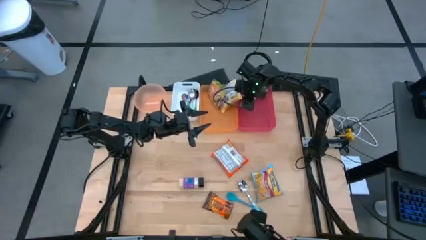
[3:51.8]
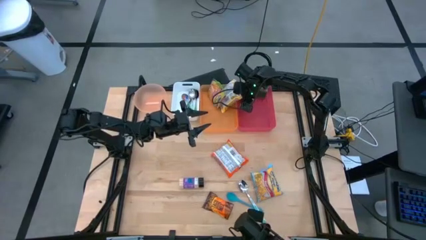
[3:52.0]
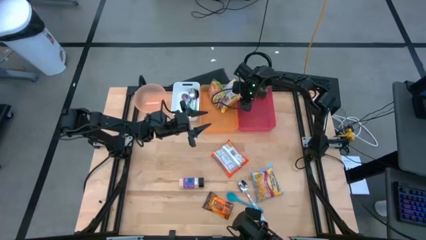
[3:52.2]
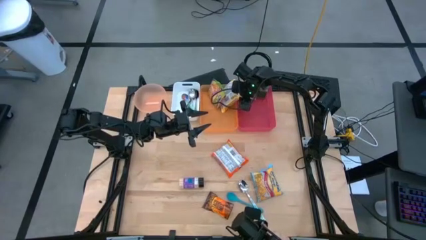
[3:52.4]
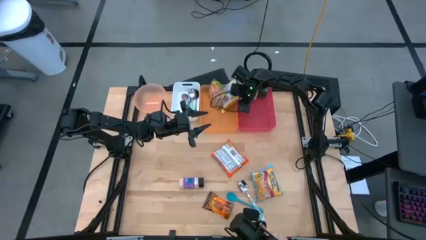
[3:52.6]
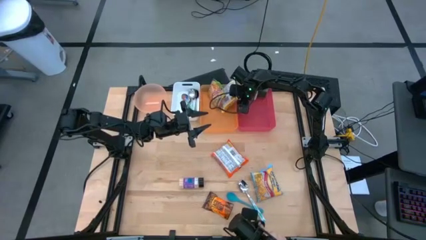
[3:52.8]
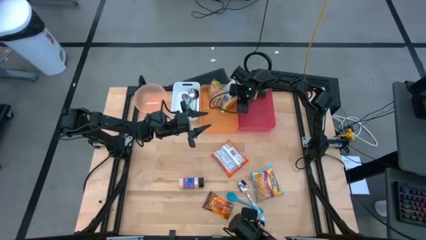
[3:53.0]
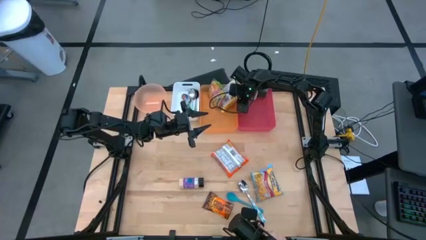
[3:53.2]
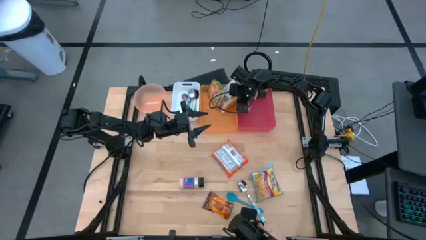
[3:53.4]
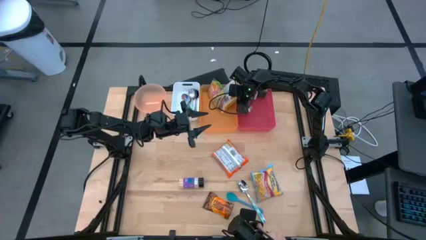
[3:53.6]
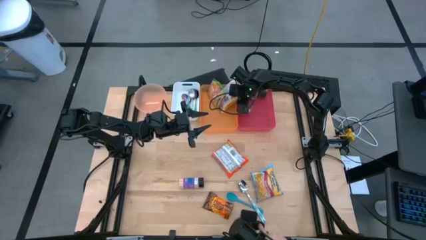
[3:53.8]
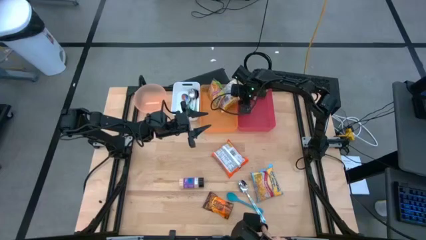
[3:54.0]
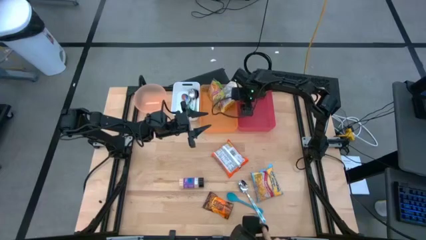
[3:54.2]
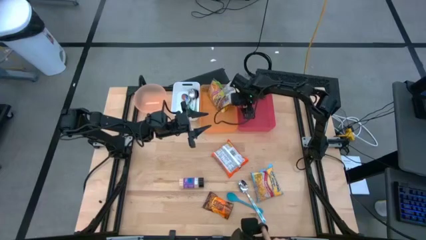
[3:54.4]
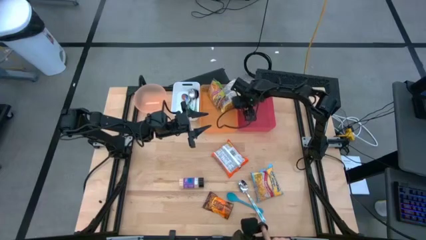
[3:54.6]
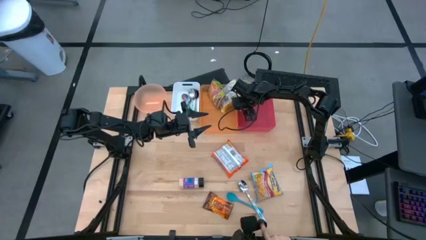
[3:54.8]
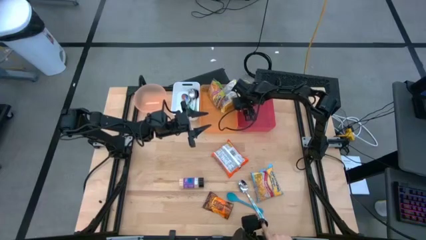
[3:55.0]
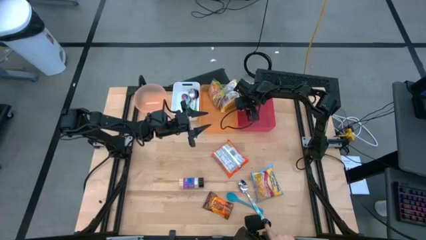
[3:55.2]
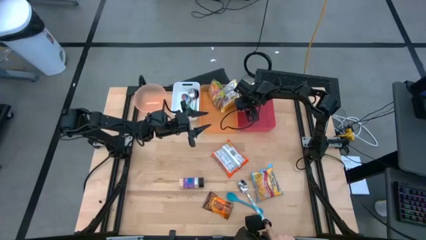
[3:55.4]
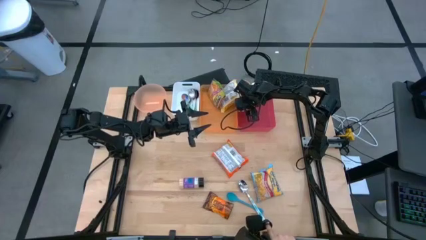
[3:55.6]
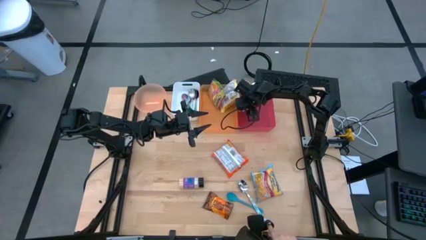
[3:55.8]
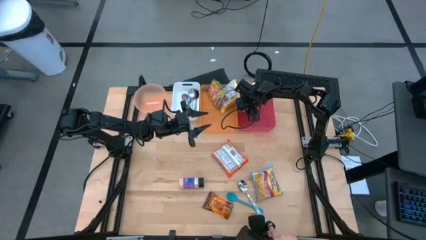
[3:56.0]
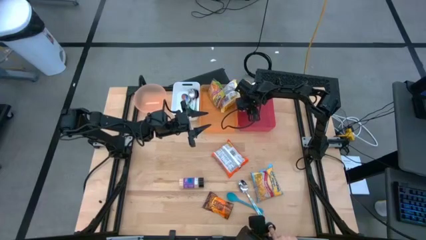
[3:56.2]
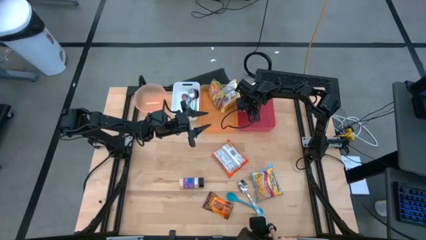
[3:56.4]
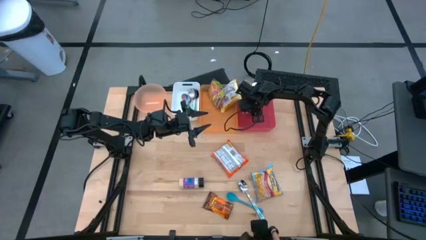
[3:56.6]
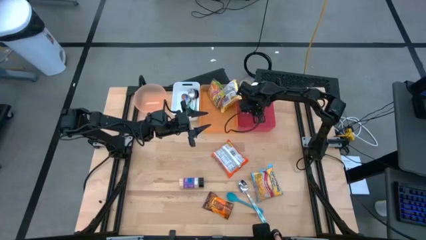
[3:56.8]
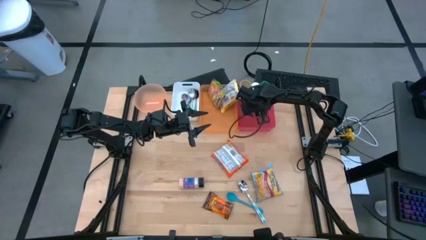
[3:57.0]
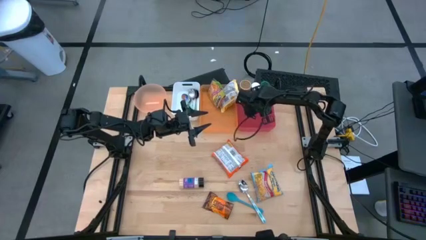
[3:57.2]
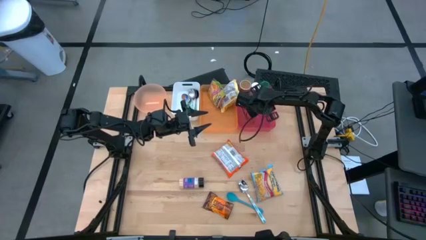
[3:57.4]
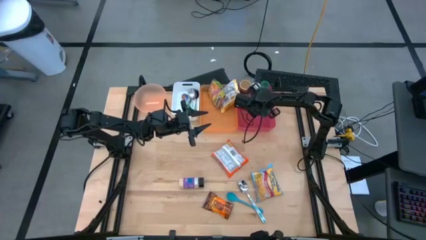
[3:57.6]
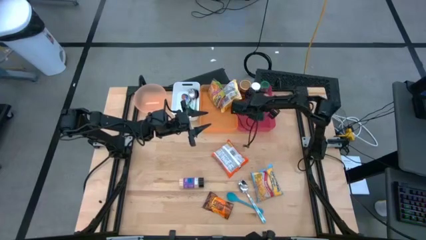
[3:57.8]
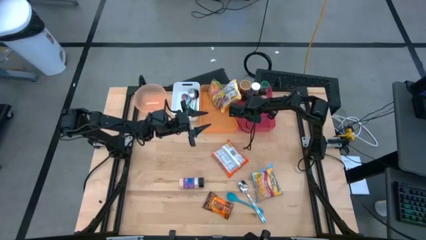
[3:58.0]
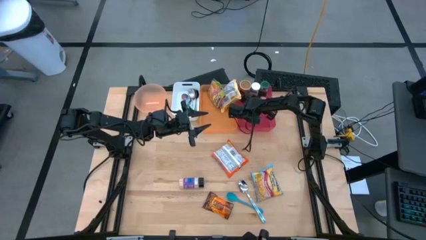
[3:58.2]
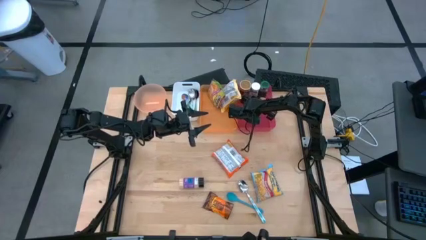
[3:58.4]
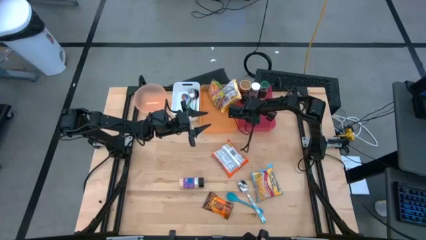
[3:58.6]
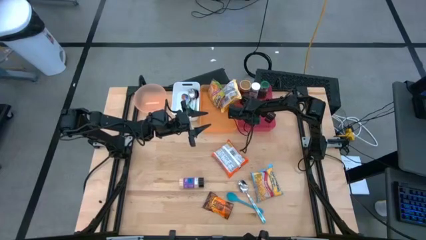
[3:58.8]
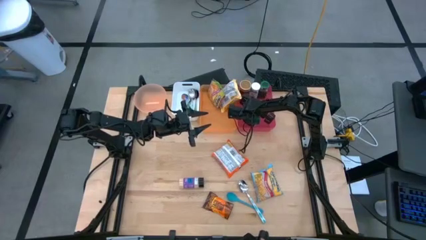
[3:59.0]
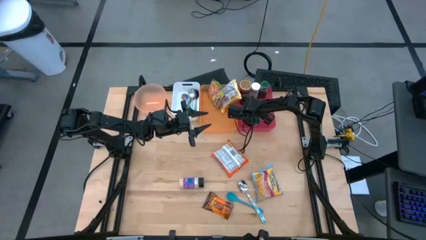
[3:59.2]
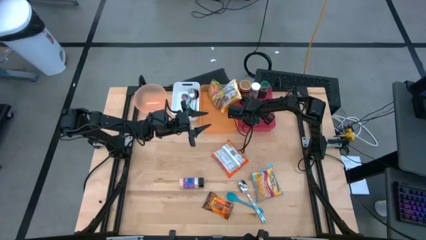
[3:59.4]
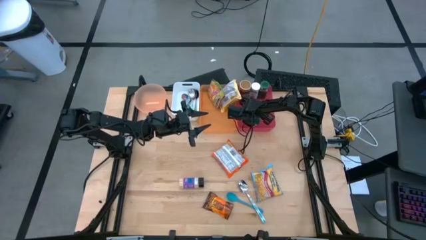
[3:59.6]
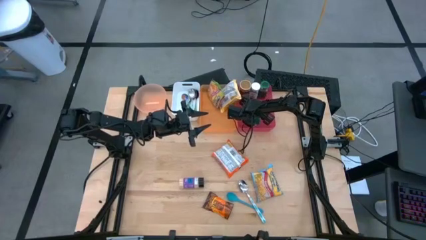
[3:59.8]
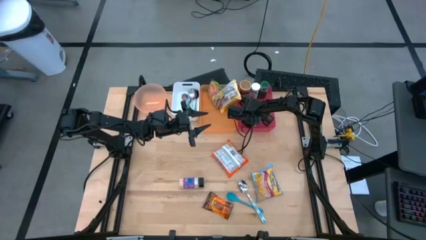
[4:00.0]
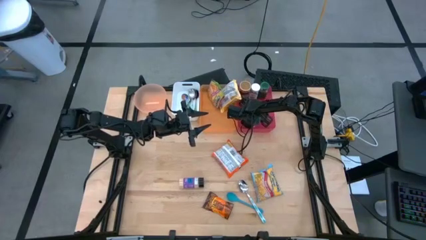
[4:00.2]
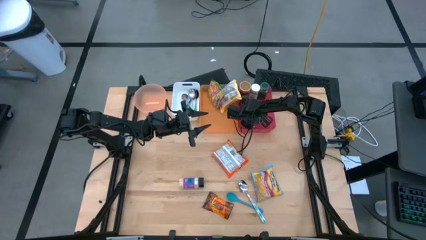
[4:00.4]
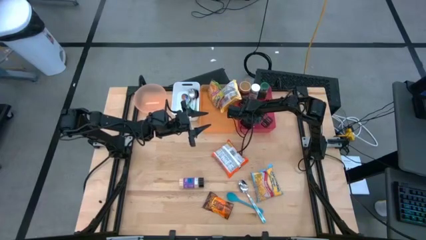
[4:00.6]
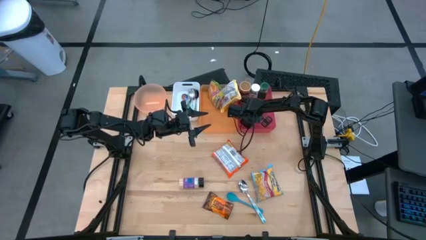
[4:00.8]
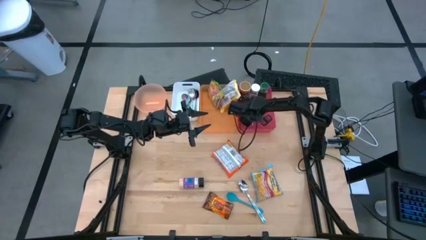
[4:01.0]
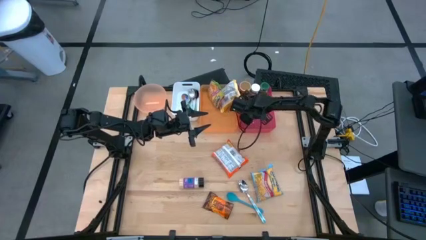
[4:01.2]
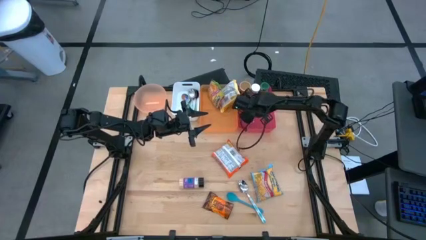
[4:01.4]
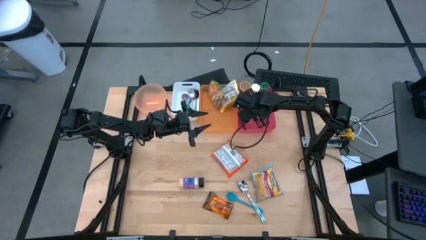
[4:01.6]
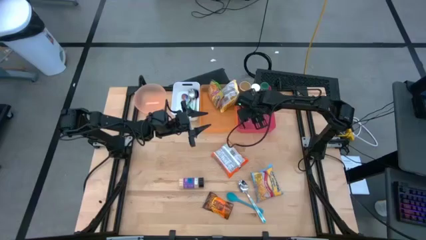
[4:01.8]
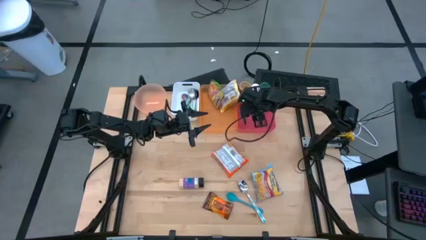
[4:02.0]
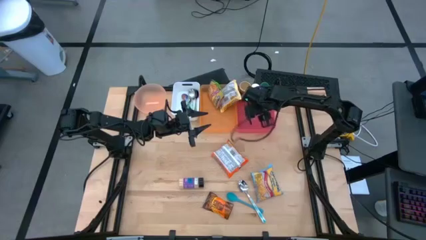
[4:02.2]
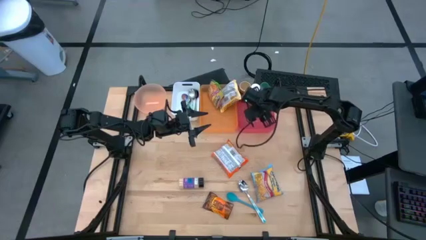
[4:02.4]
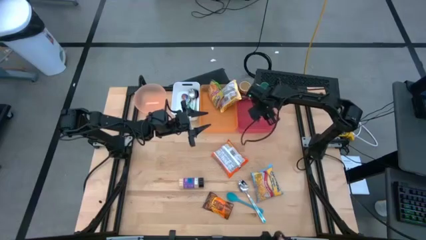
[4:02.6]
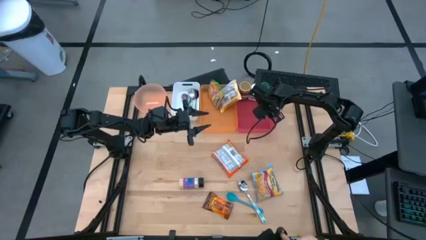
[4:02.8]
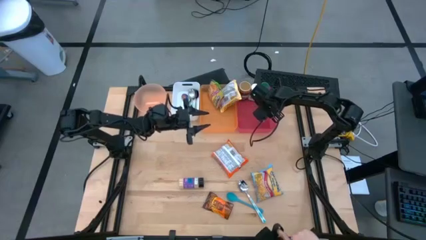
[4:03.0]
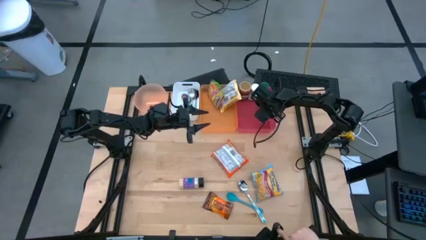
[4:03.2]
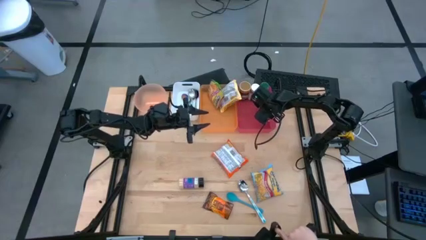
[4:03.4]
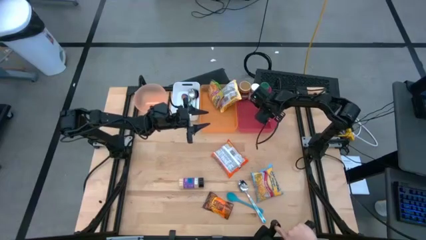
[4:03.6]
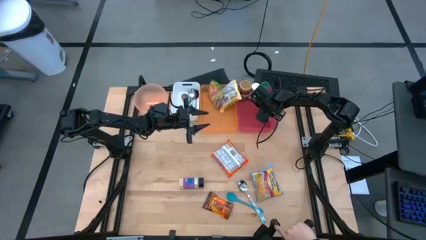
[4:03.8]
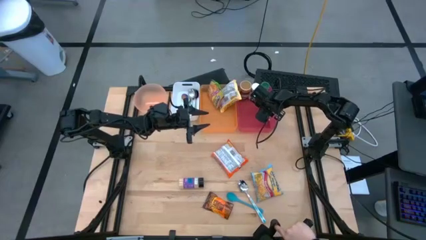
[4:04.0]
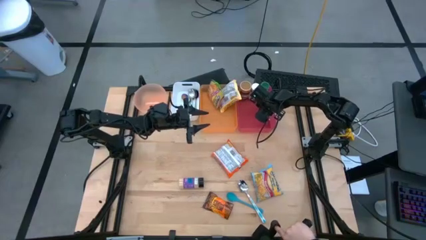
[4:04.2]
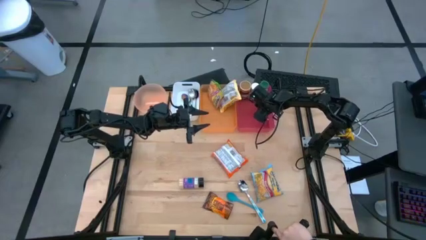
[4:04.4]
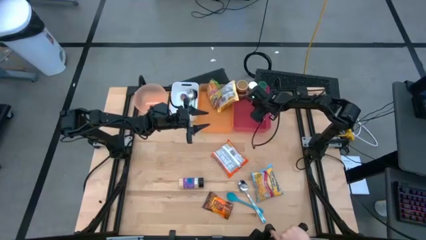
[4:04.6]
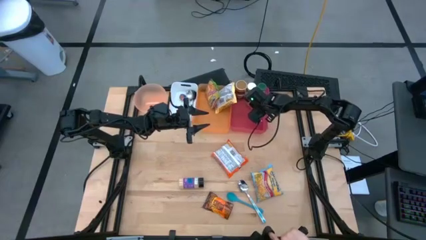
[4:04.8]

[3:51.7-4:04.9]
Task: Pick & Place Food Item
Put the brown seasoning bottle into the red bin

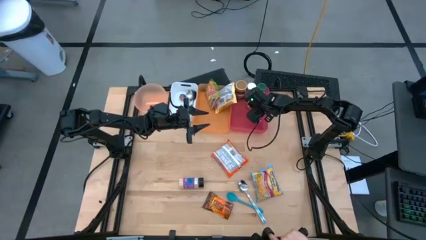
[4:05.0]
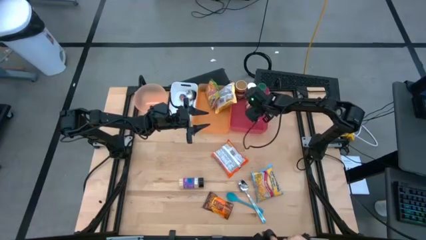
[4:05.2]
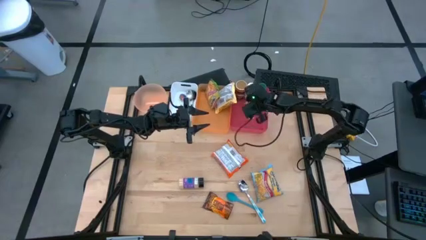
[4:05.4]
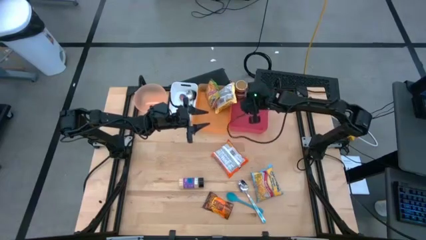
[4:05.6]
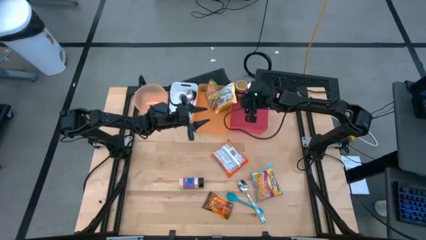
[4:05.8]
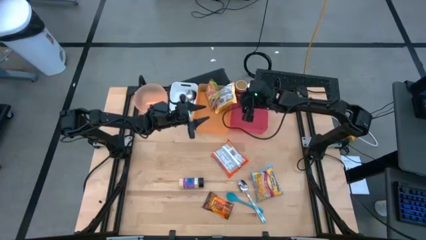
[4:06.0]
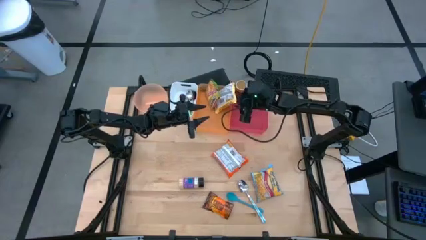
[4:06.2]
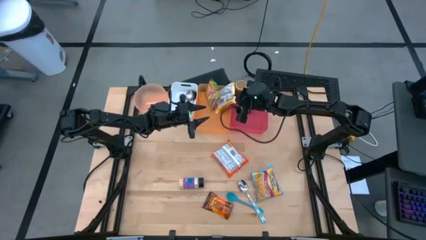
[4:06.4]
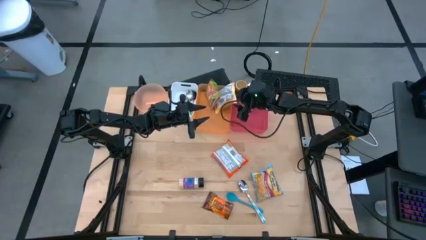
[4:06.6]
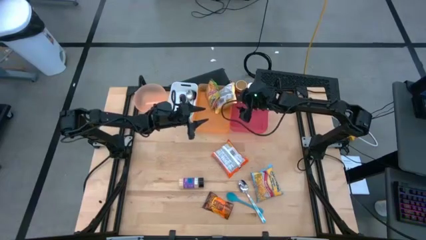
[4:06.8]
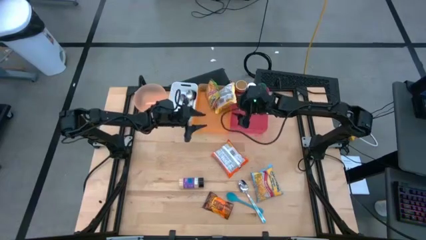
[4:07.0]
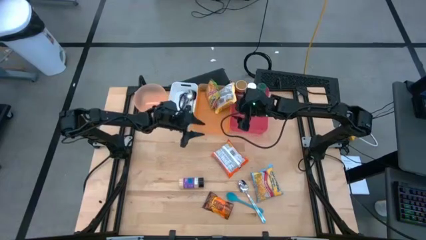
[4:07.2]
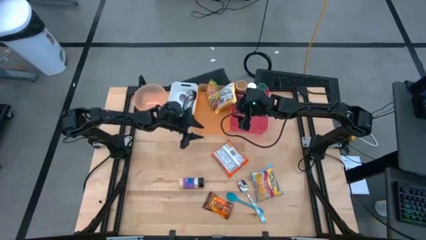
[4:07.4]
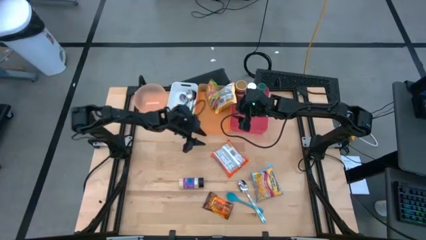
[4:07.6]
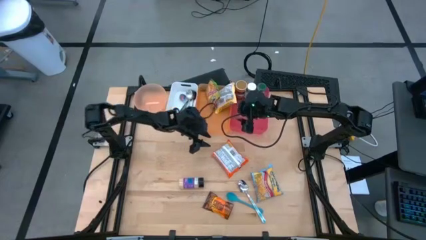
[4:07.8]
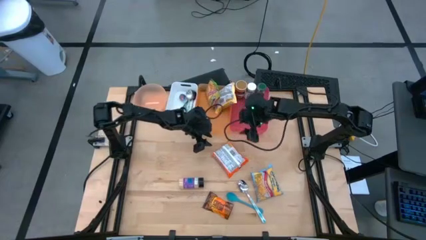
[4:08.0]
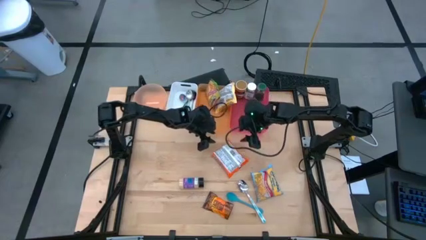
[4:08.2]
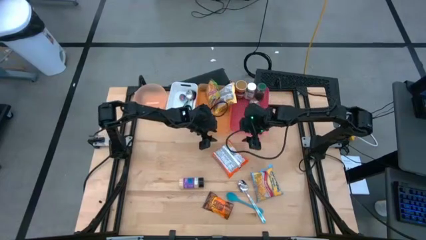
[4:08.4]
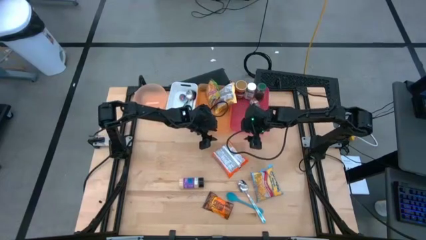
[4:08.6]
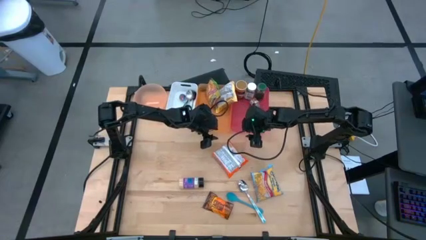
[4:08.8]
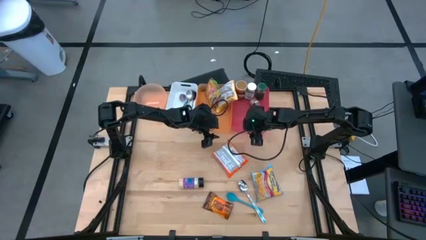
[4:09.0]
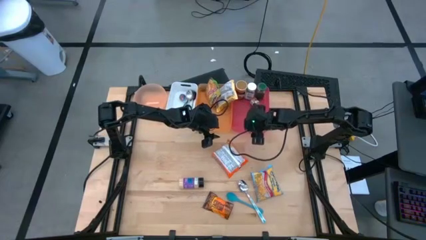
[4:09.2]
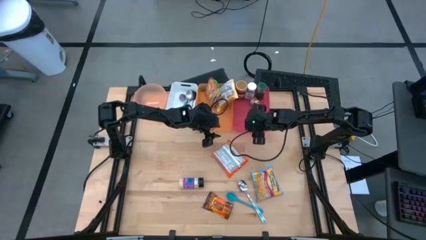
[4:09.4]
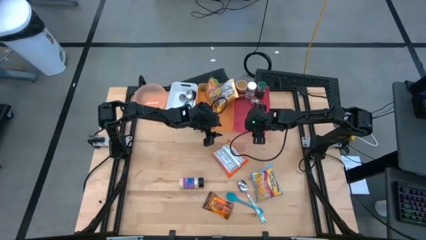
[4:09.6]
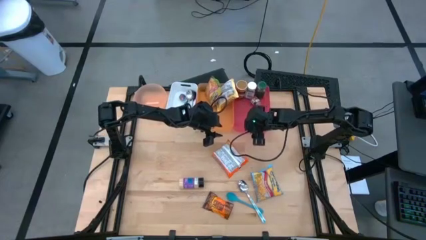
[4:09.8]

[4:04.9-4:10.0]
Adjust the orange bin on the table
